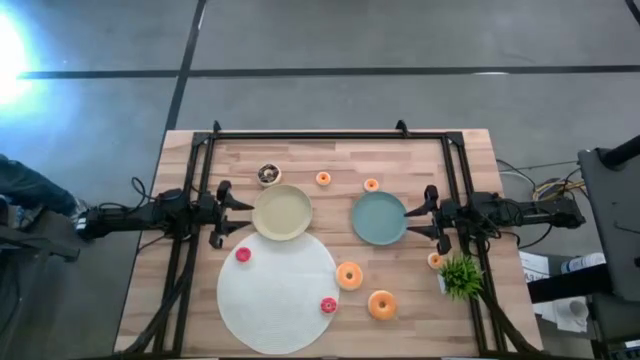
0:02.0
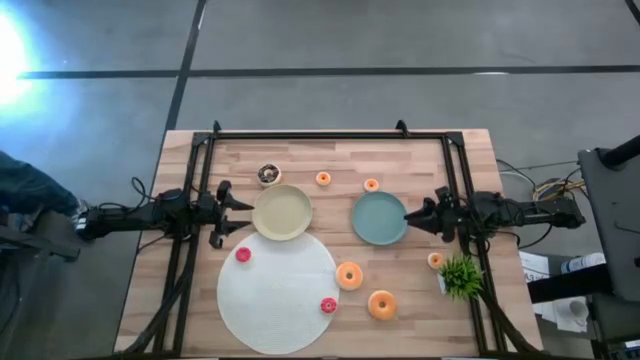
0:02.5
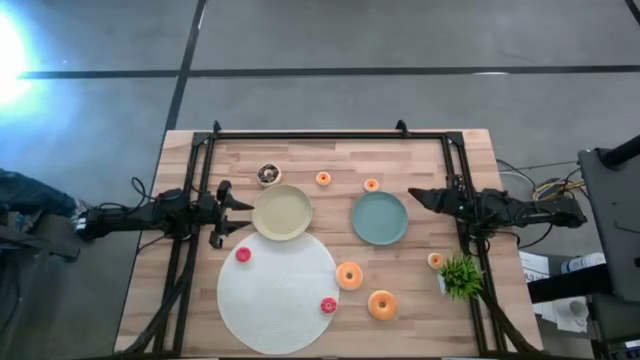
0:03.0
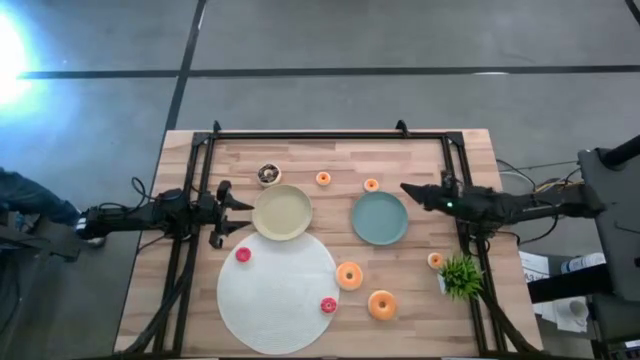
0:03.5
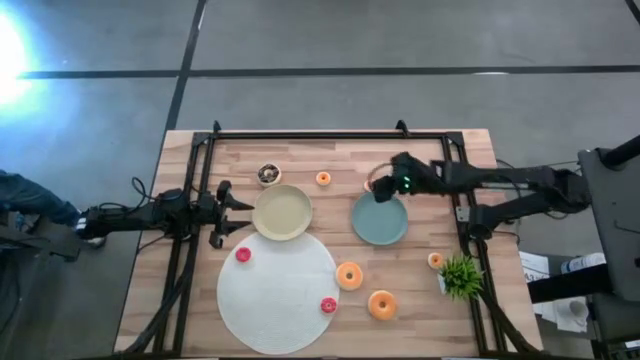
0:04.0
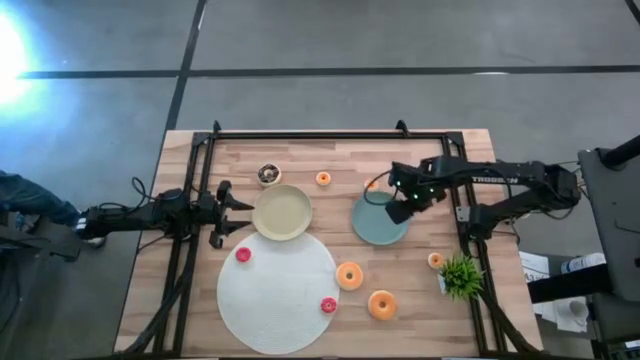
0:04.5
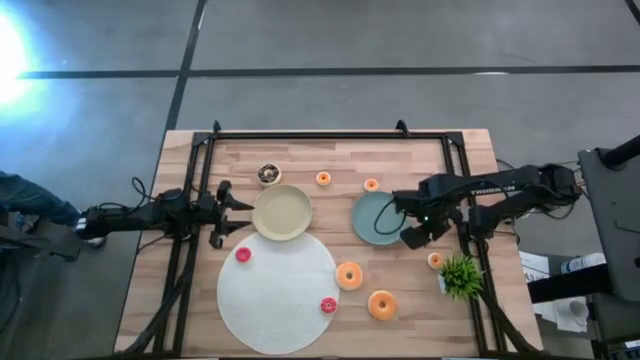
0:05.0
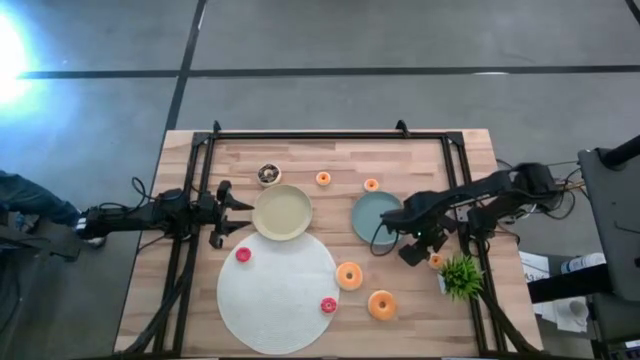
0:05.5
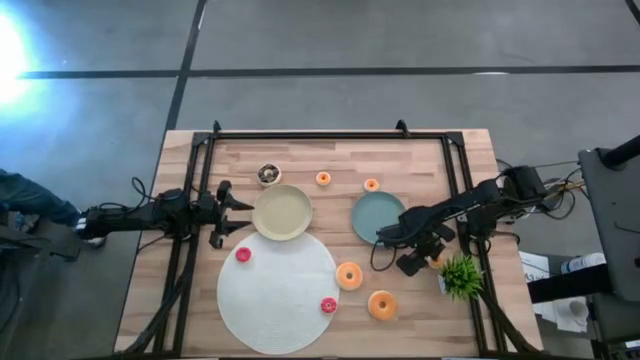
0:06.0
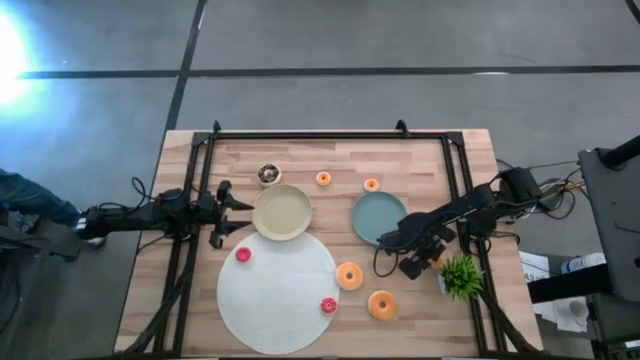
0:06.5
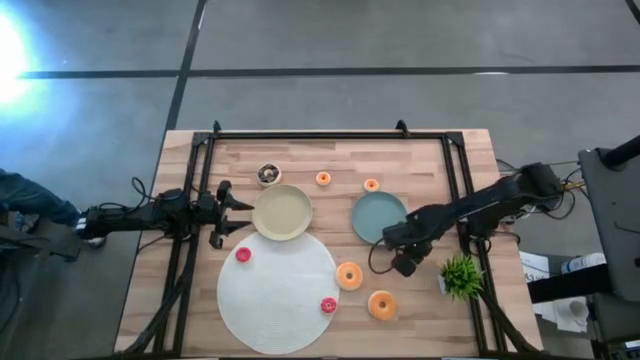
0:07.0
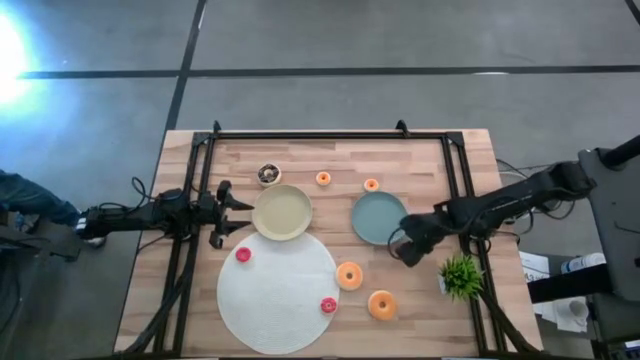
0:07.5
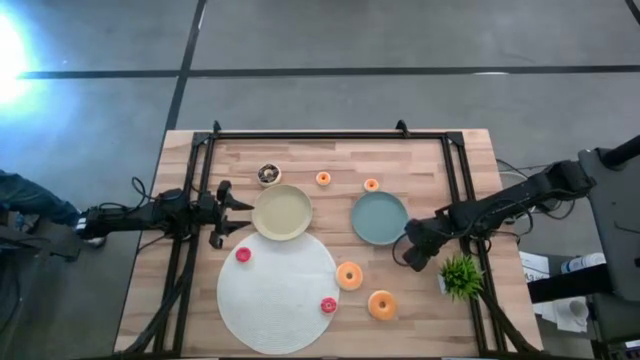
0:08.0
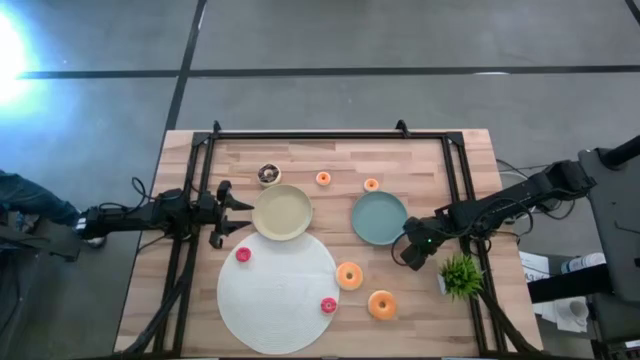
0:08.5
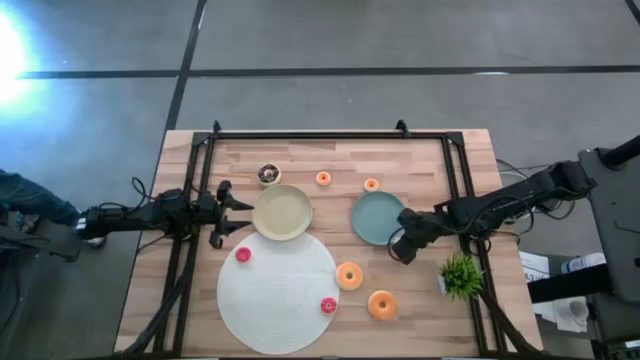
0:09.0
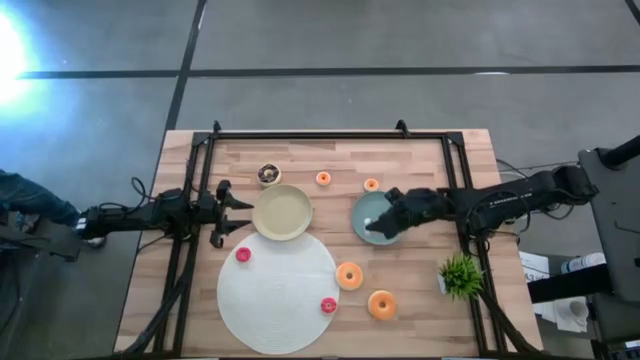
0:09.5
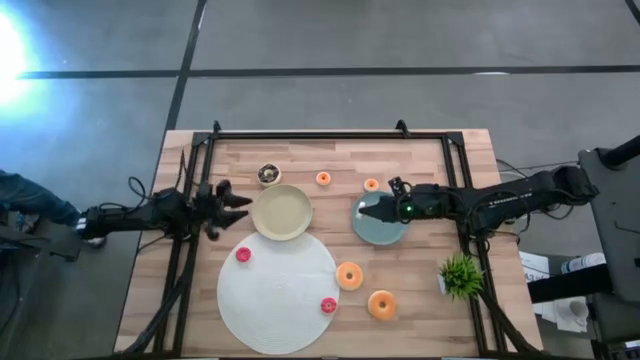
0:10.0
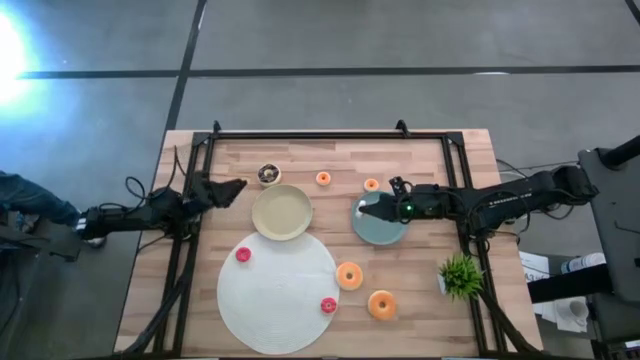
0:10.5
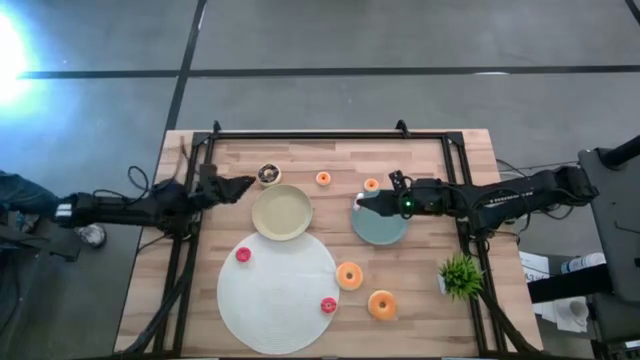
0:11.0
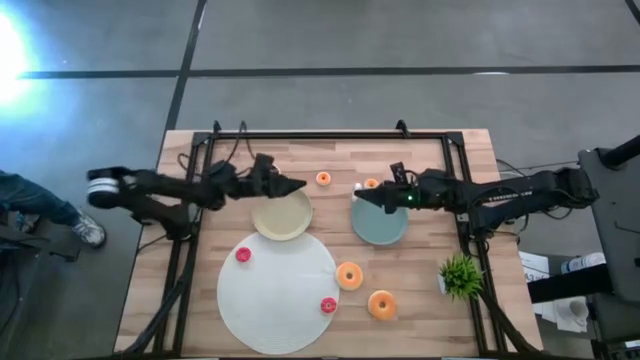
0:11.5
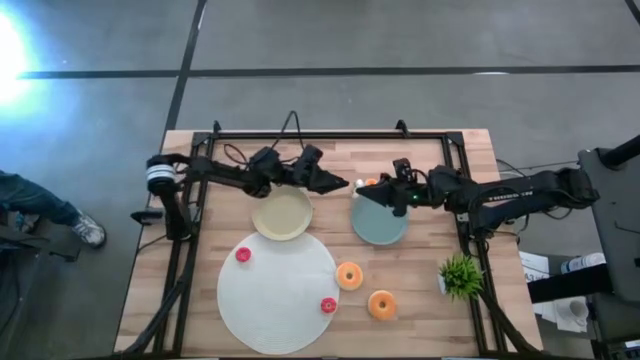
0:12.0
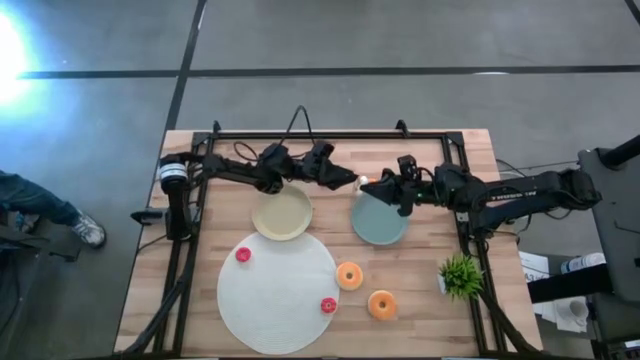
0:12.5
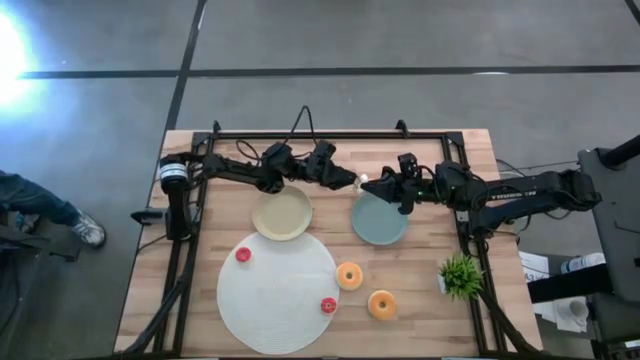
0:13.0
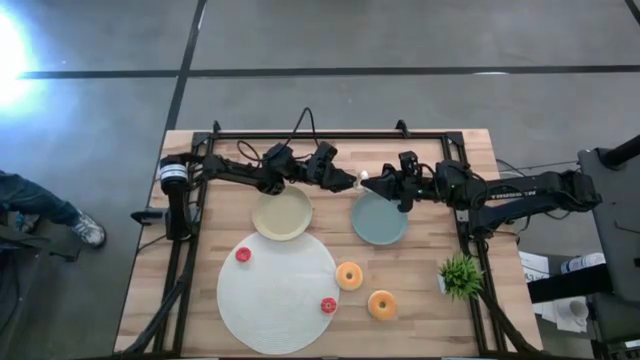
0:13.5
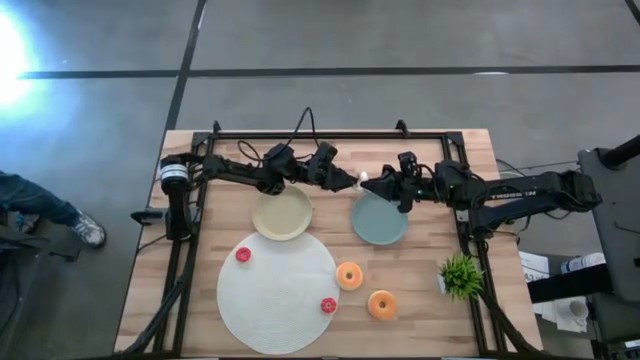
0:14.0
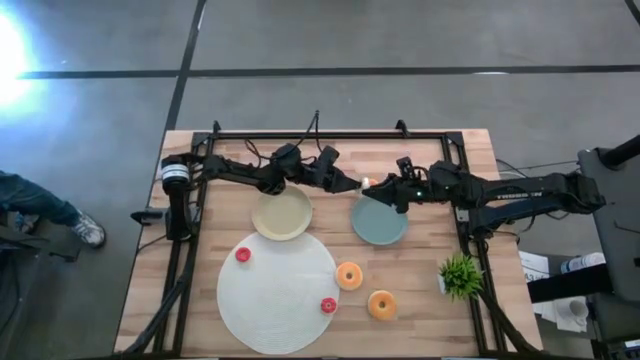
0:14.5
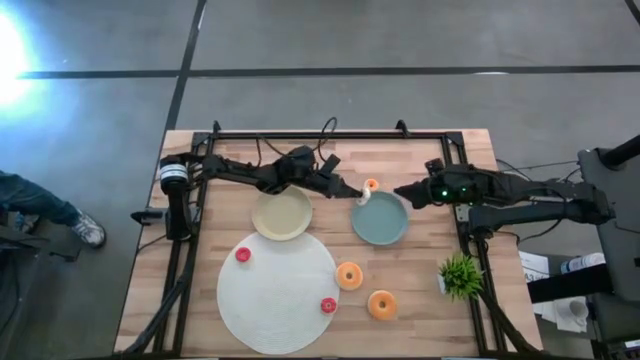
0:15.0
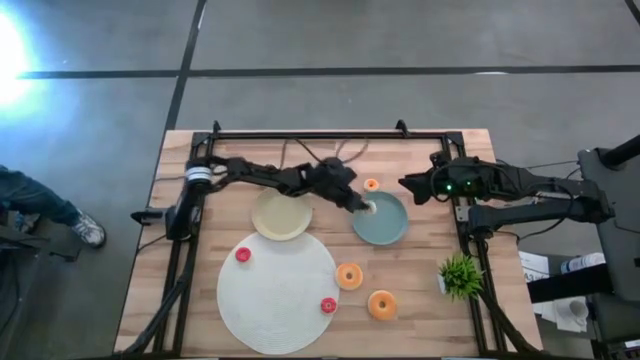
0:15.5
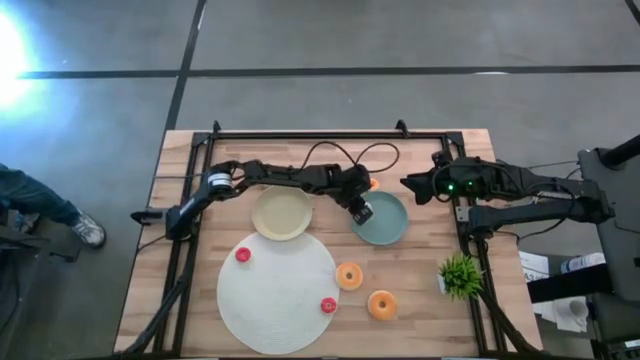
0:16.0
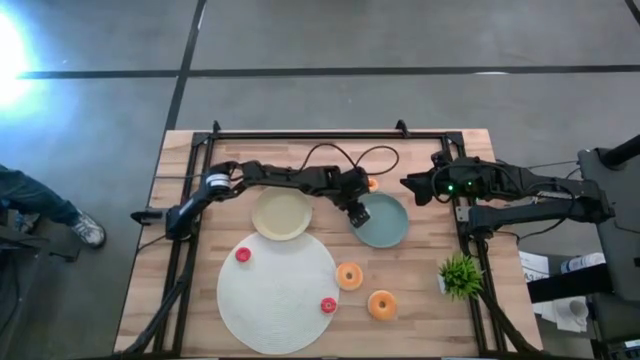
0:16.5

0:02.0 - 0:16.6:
Task: Pick & Place donuts
Put the white donut on the blue plate

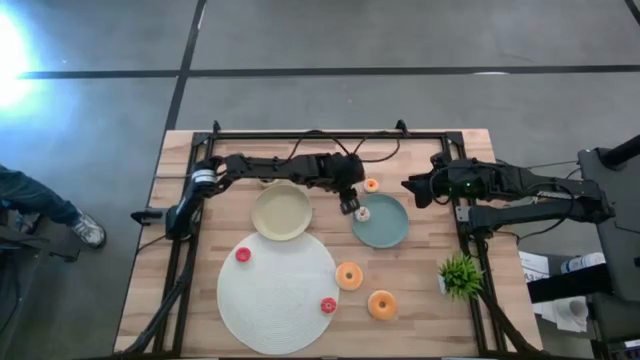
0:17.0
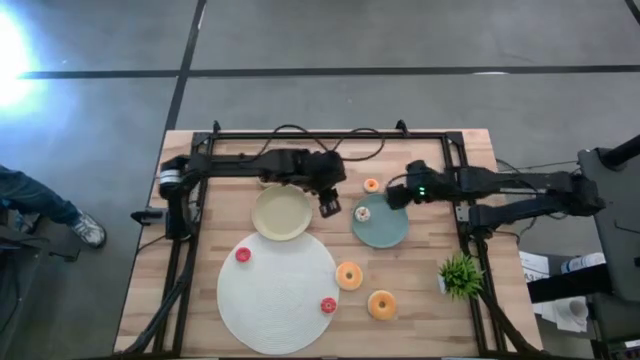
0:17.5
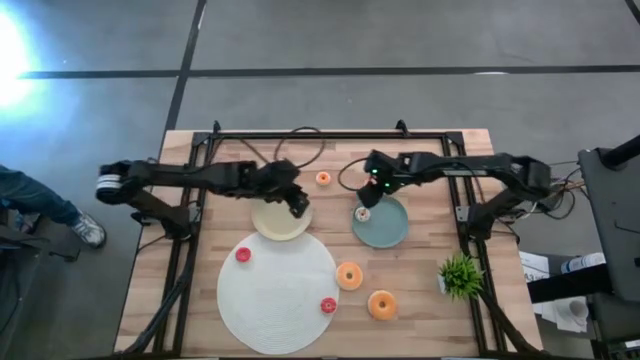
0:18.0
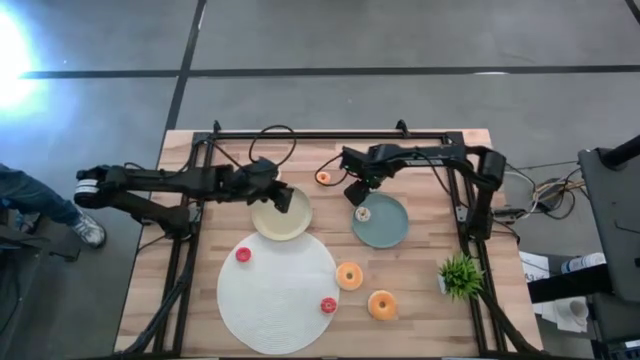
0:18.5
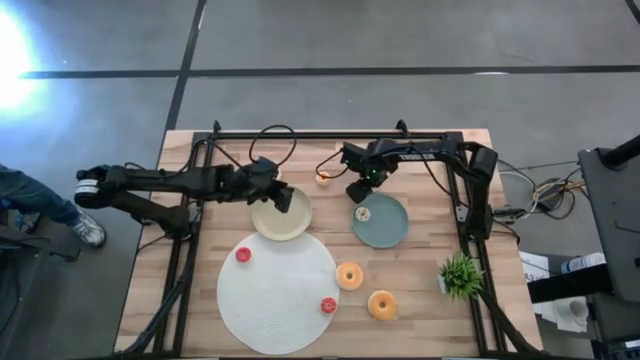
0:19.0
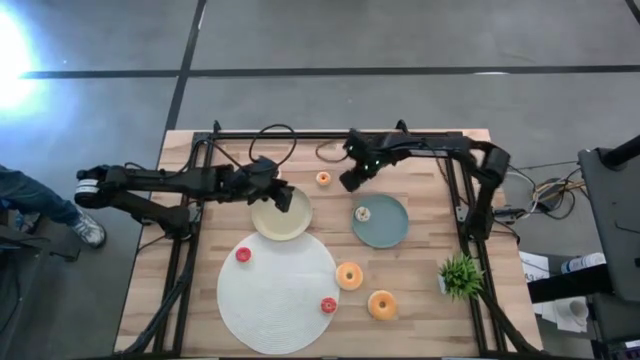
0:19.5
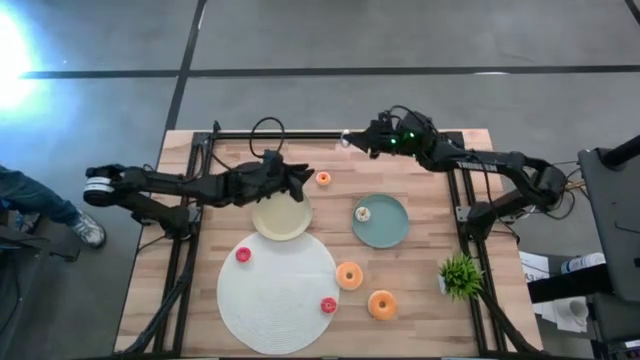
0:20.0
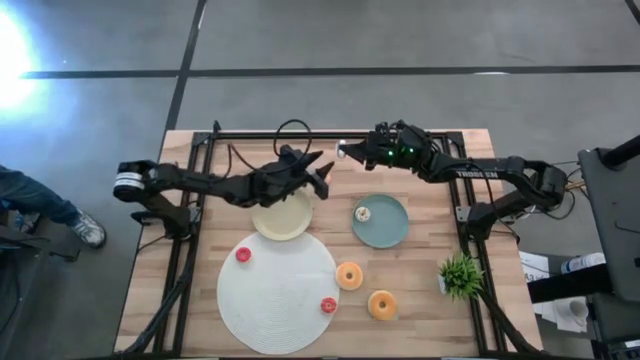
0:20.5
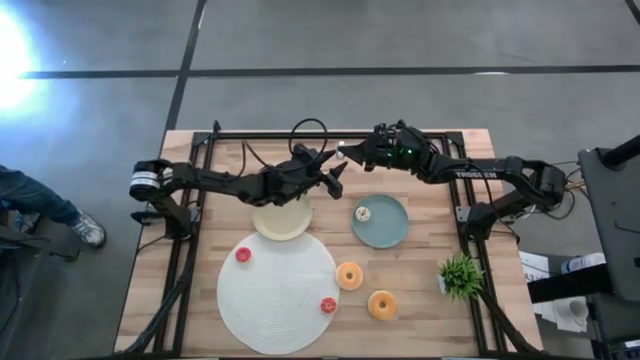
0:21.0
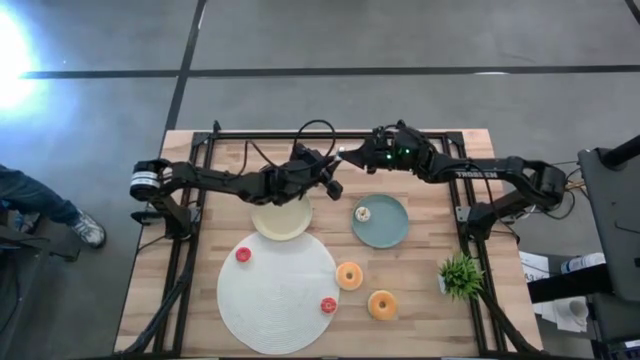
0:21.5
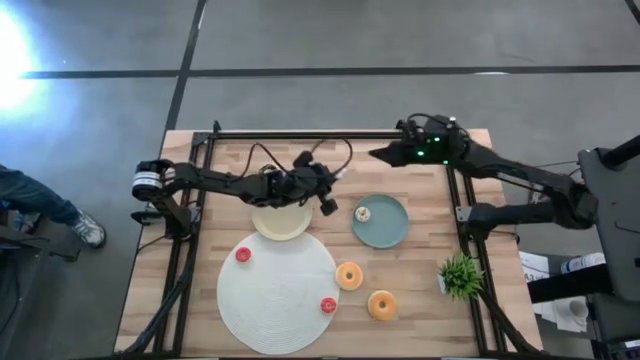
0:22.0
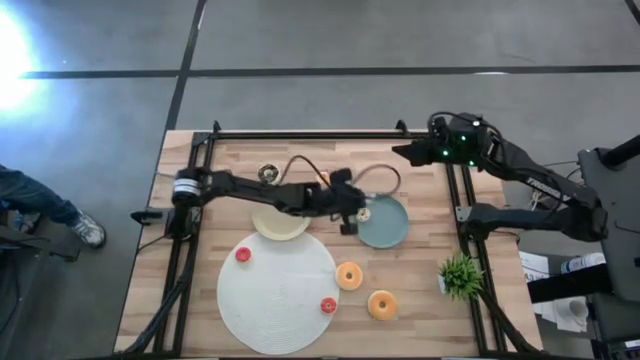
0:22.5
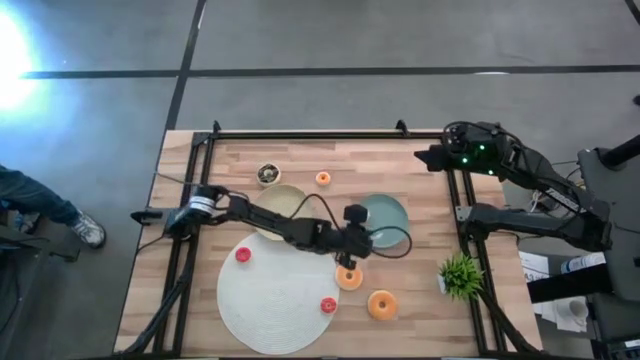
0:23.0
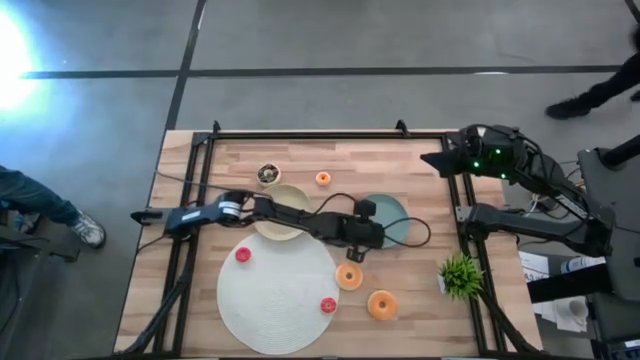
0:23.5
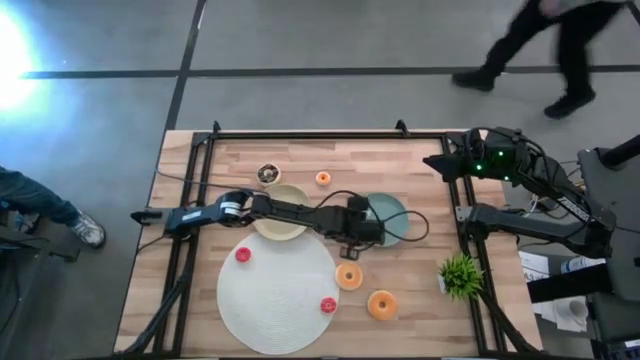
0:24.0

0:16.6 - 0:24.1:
Put the blue donut on the blue plate

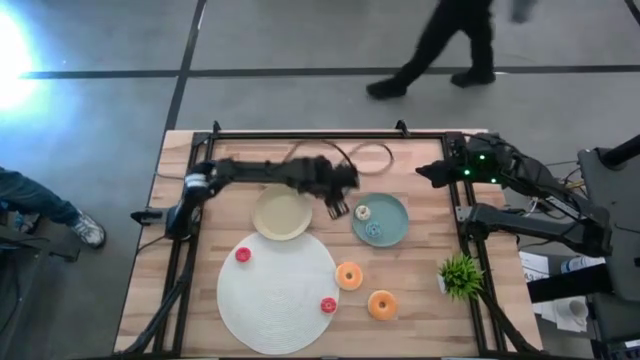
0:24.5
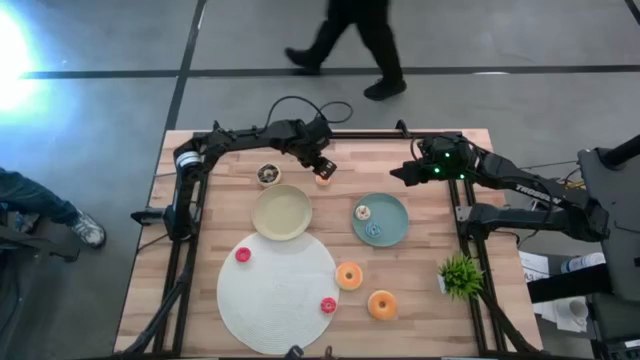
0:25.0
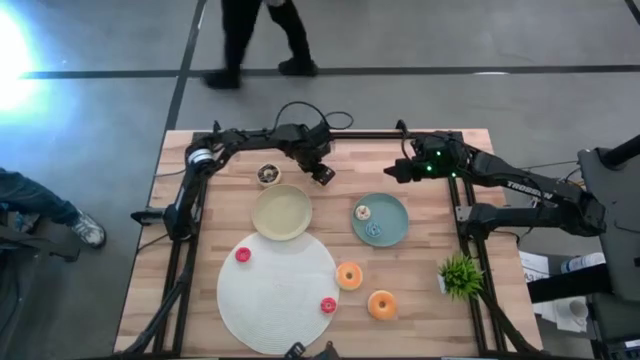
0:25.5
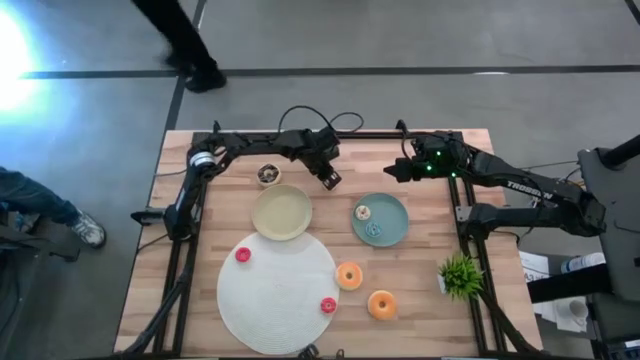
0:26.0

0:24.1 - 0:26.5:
Put the yellow donut on the blue plate
